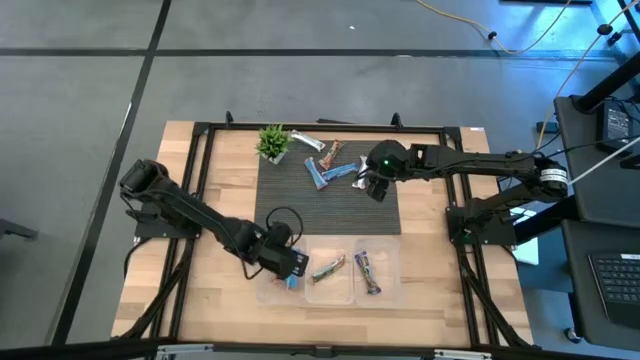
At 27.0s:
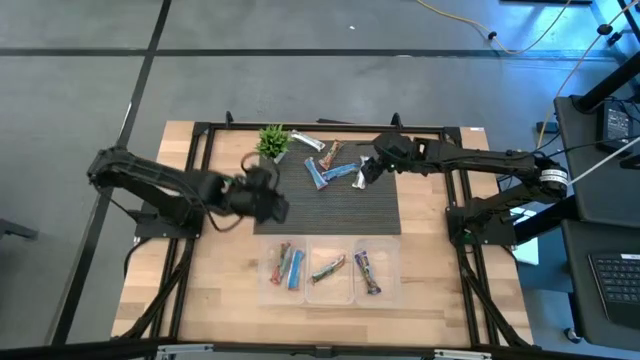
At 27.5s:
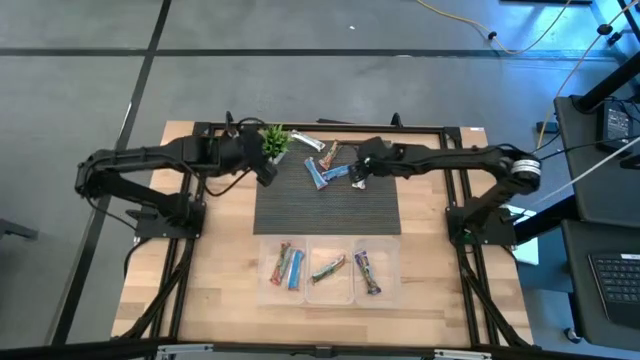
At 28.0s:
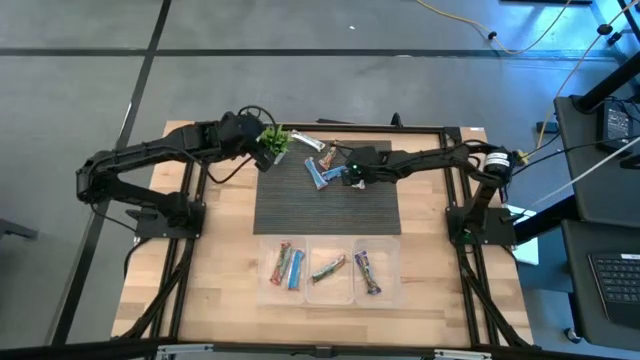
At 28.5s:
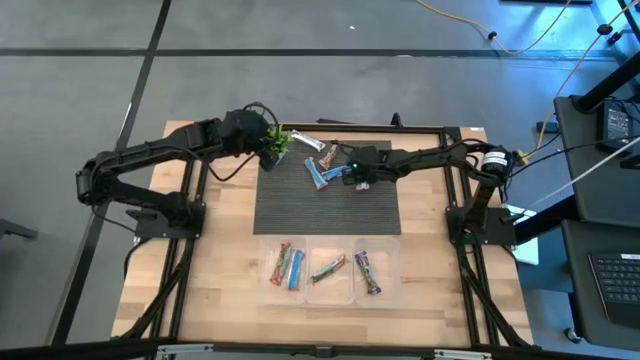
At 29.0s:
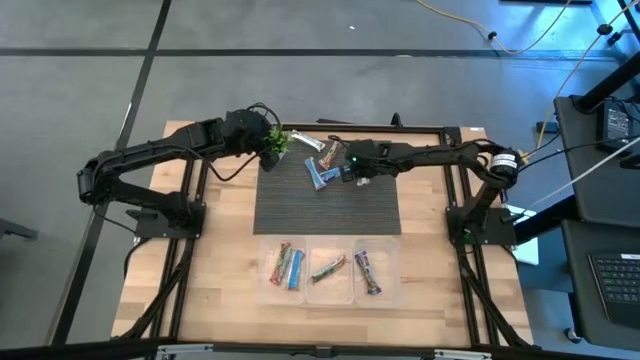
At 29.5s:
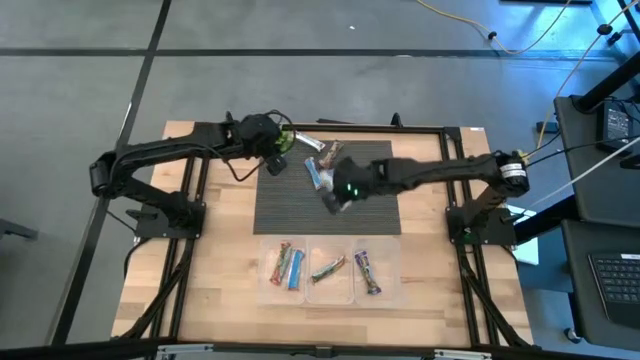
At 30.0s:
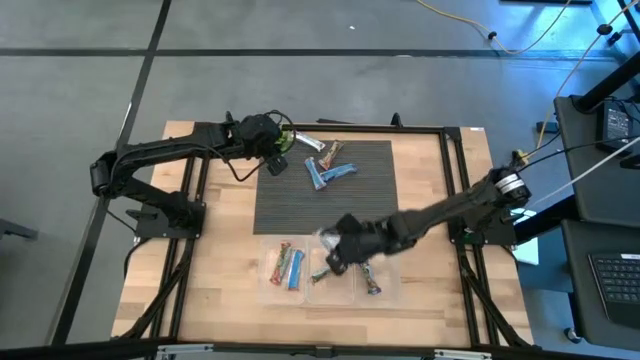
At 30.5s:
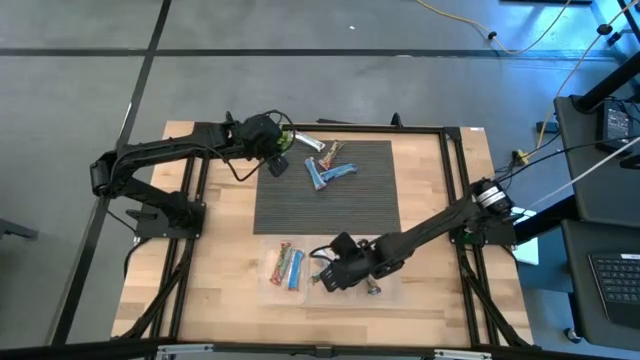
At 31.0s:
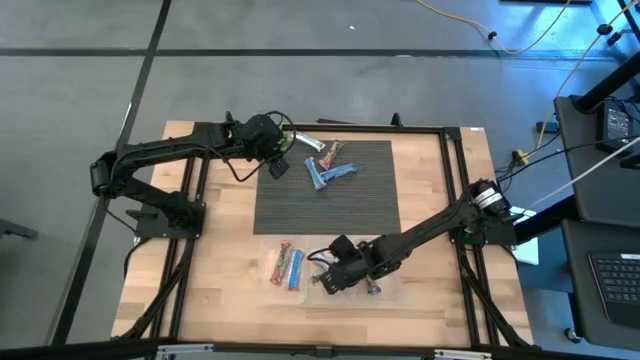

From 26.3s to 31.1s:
Task: Pick and place Granola Bars by type
Put the yellow granola bar into the middle transparent bin

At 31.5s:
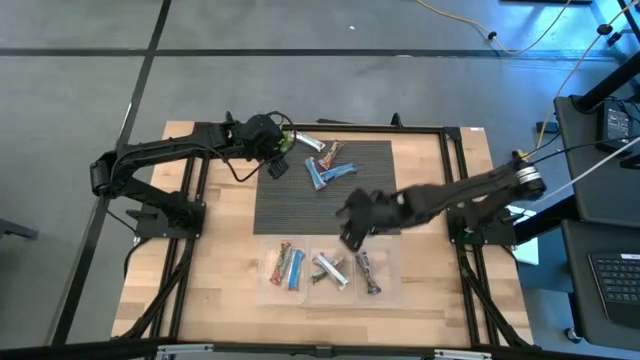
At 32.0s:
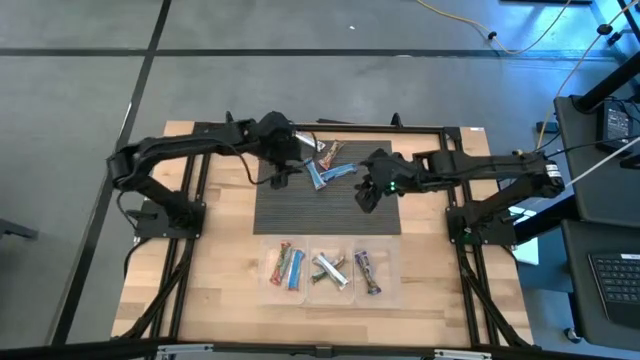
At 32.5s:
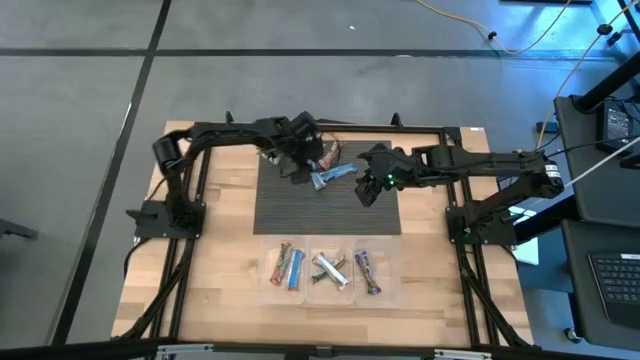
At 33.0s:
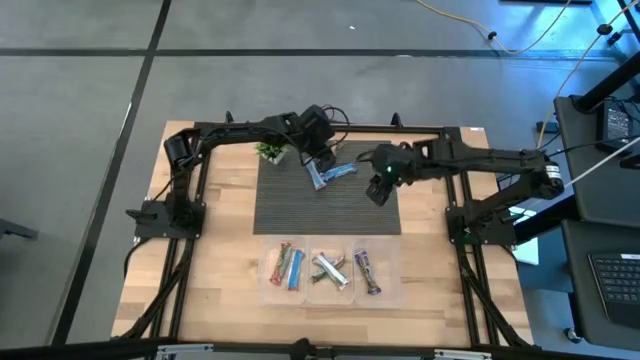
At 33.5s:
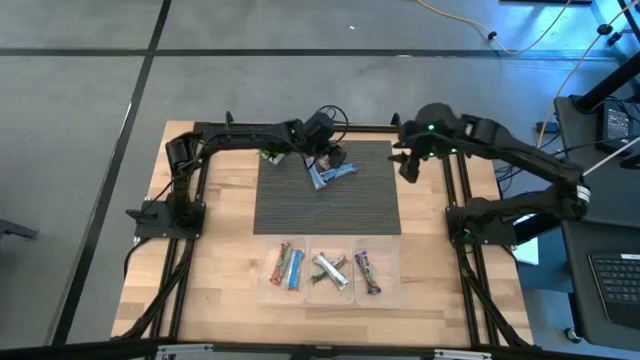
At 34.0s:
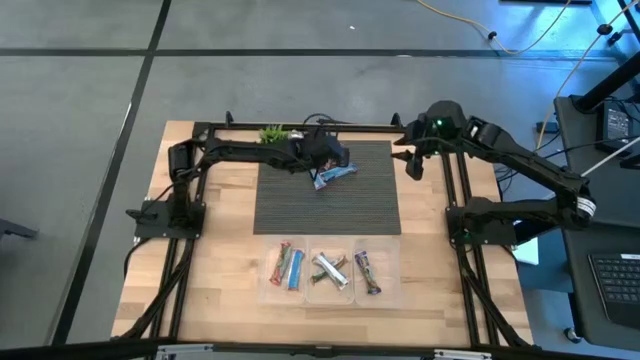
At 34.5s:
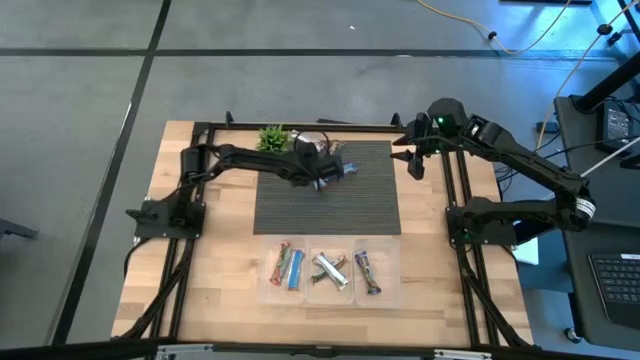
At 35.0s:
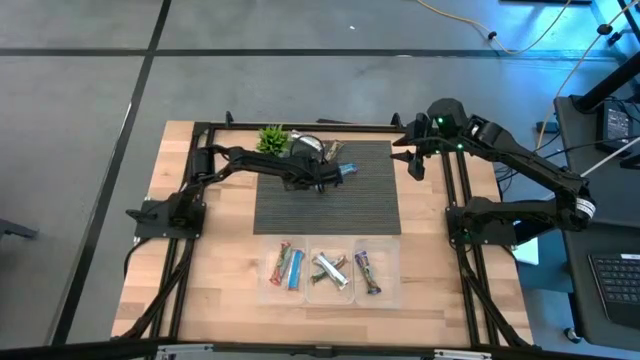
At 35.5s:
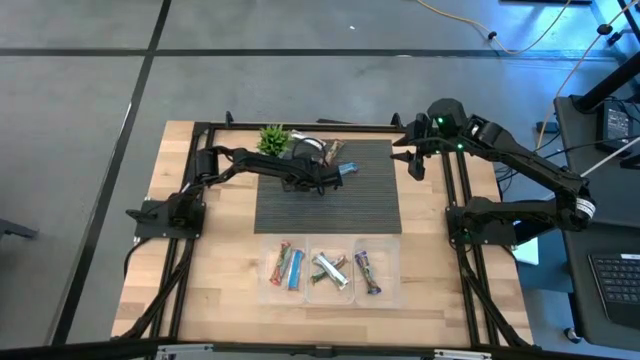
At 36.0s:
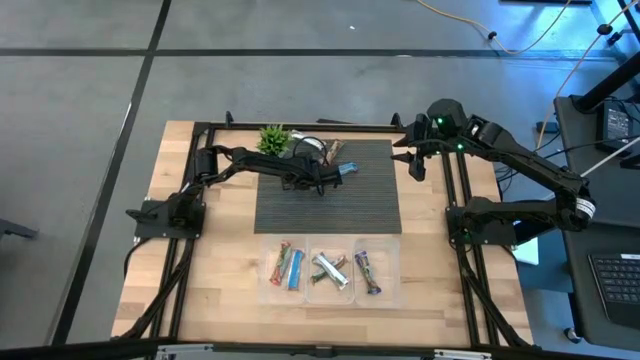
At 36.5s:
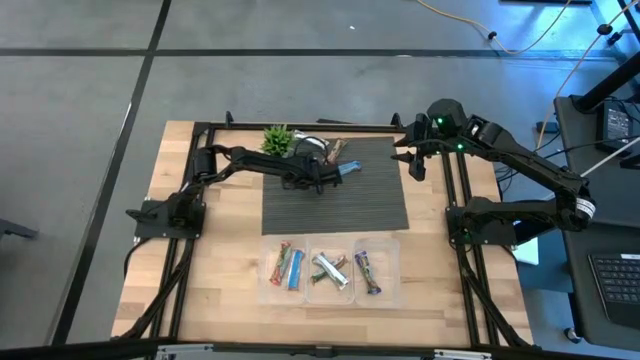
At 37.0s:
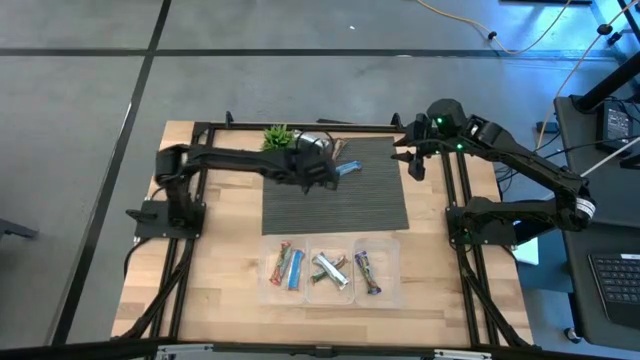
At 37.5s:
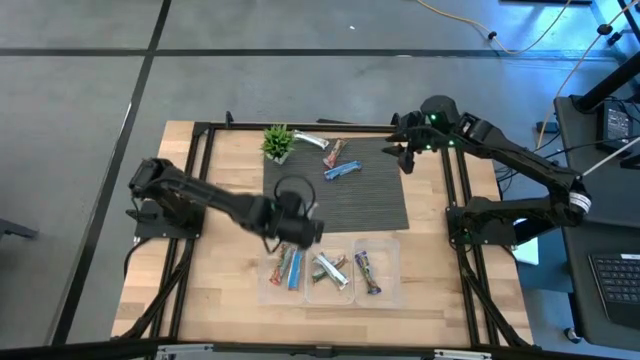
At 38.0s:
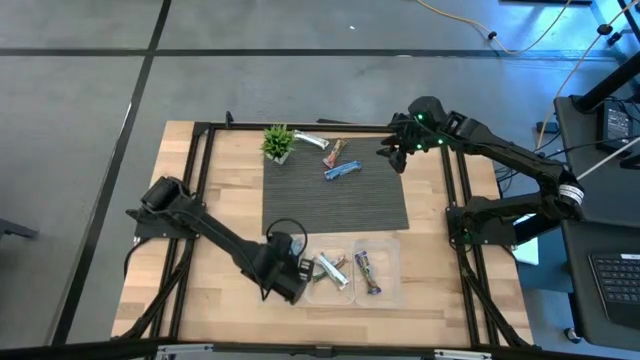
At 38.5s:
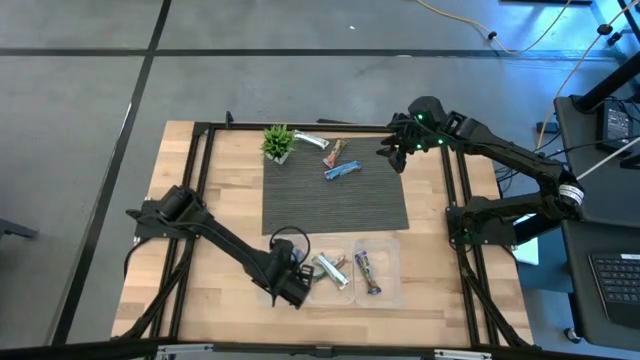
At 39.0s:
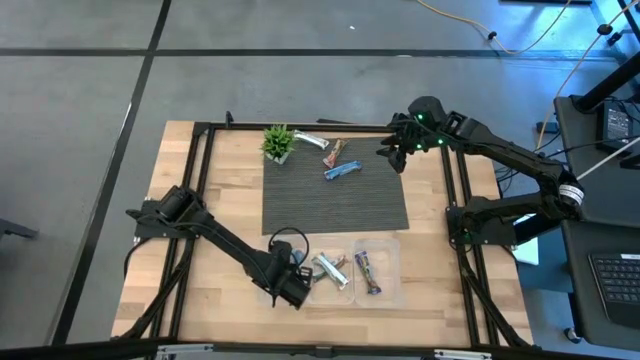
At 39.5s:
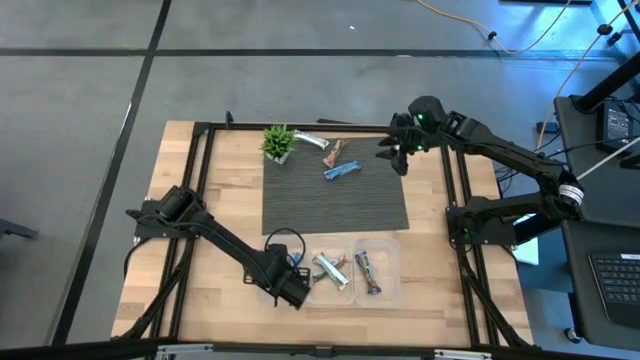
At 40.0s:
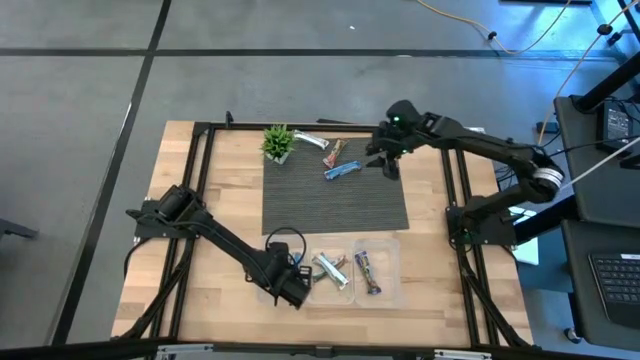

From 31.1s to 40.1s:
Put the red granola bar into the left transparent bin

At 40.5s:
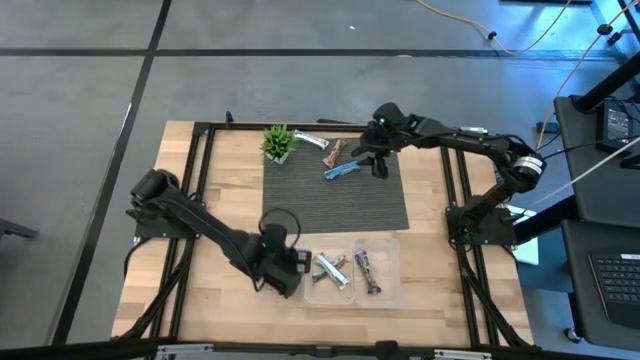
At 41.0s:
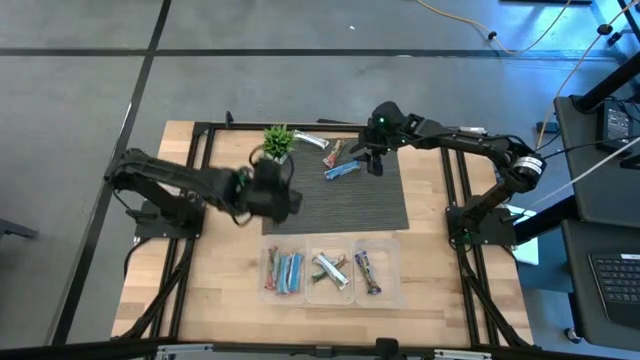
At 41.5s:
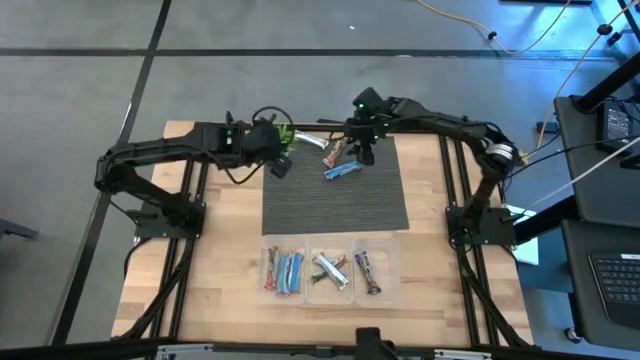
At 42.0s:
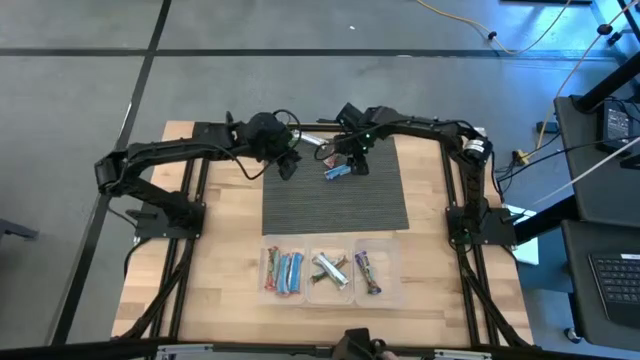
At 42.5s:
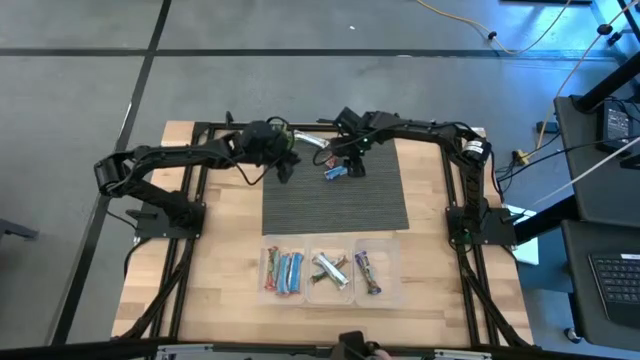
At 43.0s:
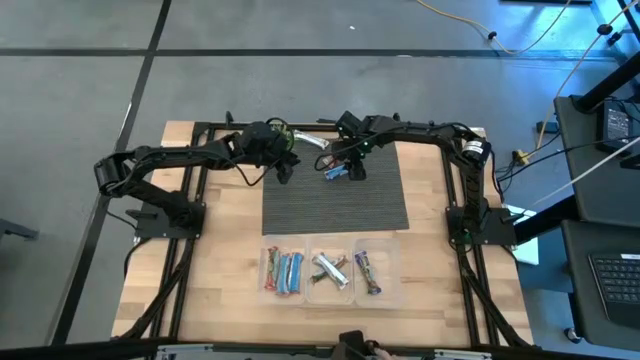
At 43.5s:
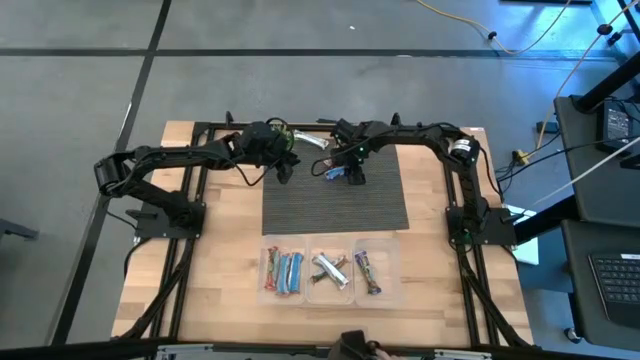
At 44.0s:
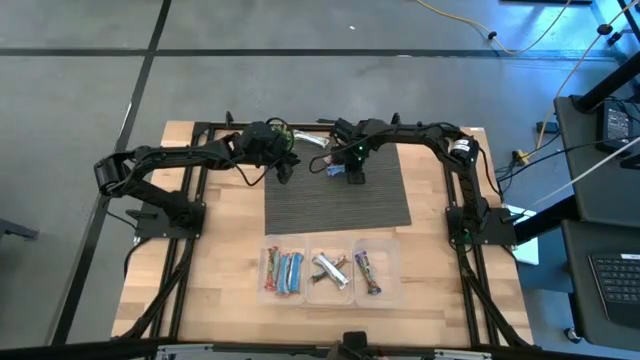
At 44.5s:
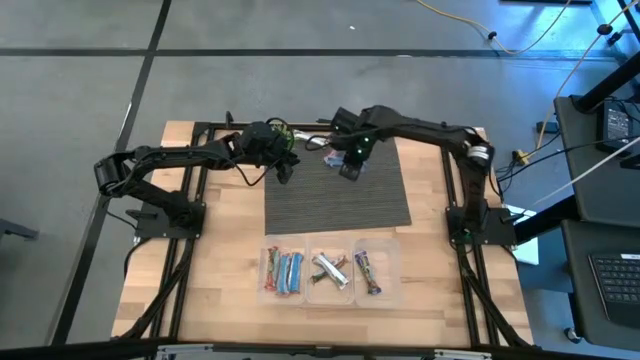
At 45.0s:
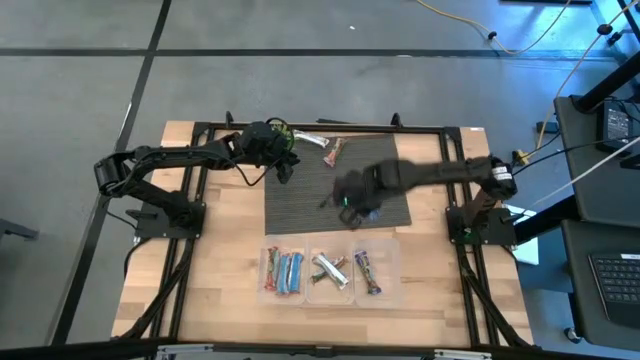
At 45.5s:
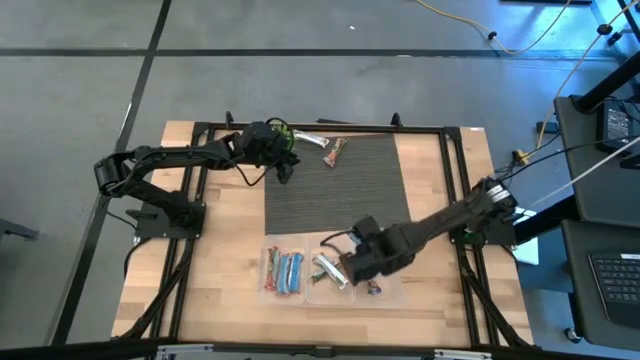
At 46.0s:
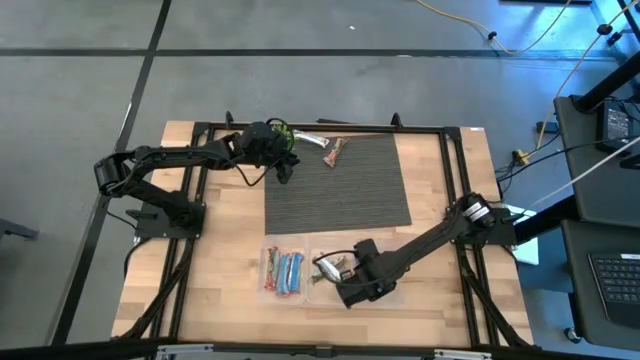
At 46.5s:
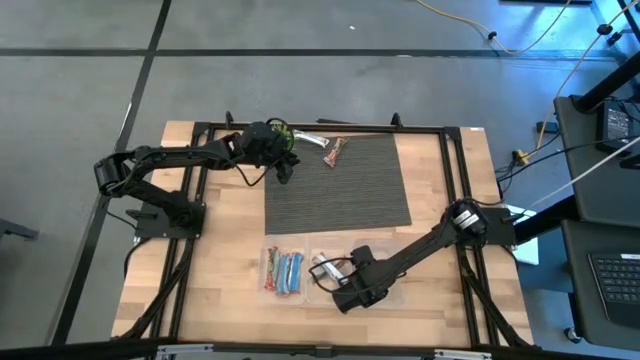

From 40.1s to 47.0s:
Put the blue granola bar into the right transparent bin

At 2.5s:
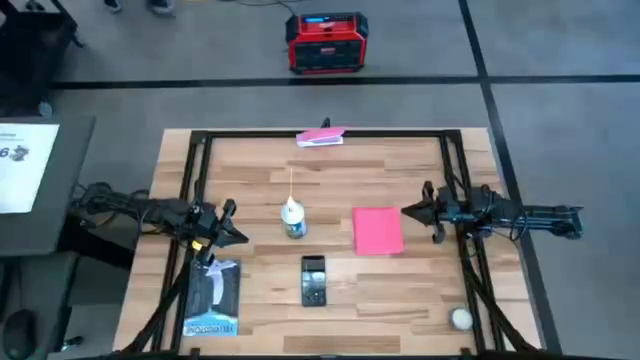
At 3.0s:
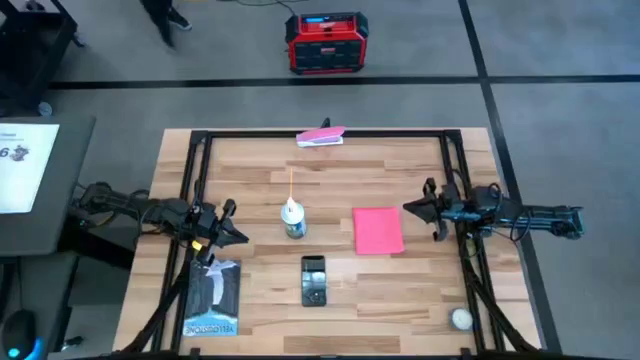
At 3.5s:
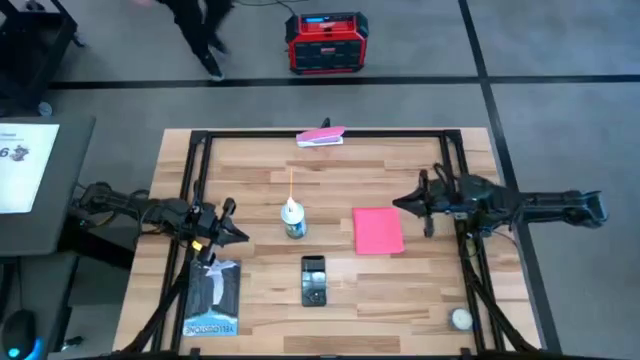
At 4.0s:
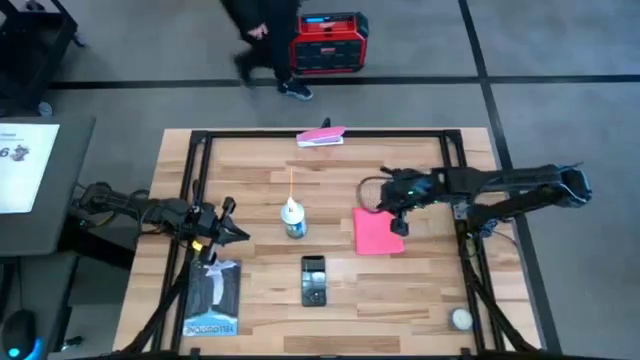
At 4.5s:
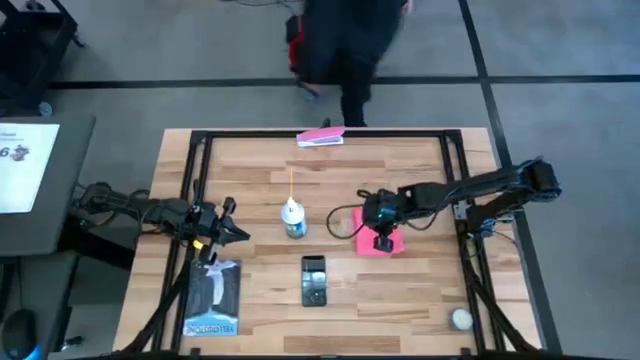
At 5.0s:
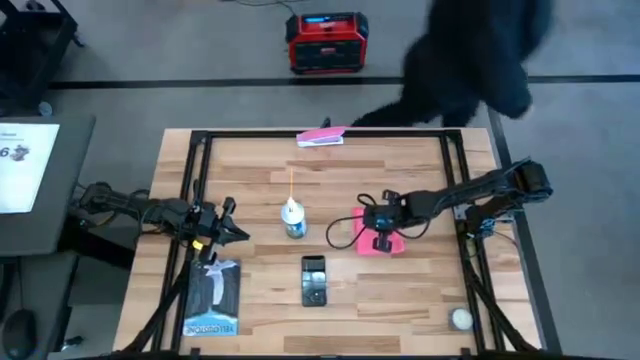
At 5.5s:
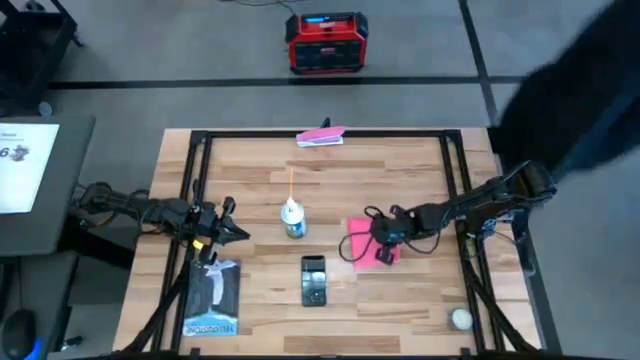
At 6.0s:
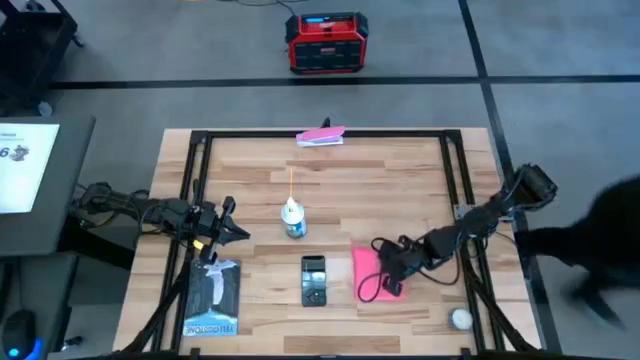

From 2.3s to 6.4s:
Task: Apply microfiber cloth
Adjust the pink microfiber cloth on the table
